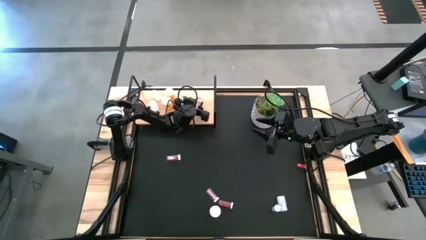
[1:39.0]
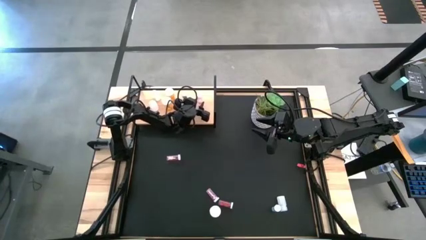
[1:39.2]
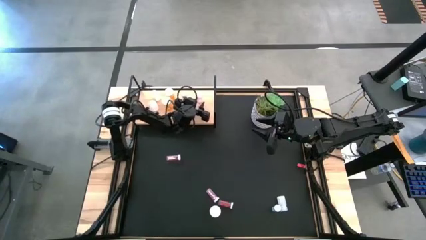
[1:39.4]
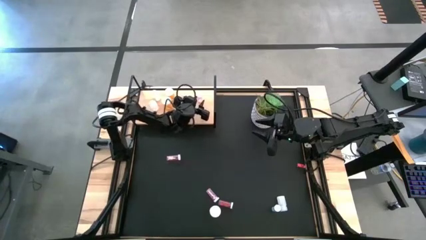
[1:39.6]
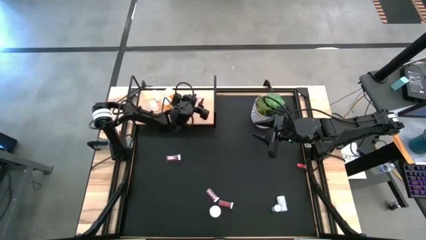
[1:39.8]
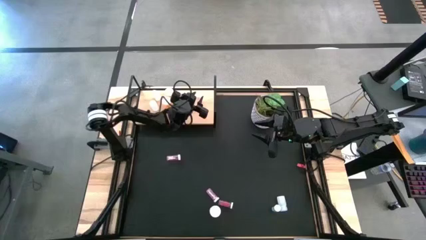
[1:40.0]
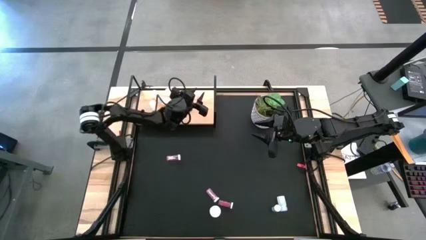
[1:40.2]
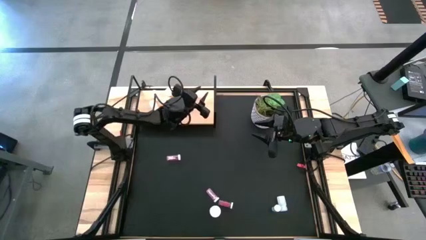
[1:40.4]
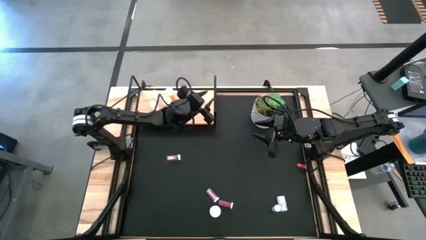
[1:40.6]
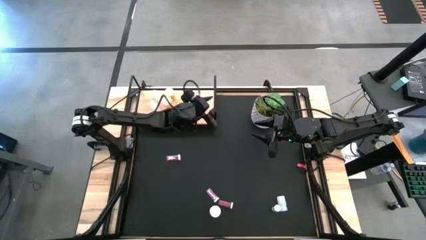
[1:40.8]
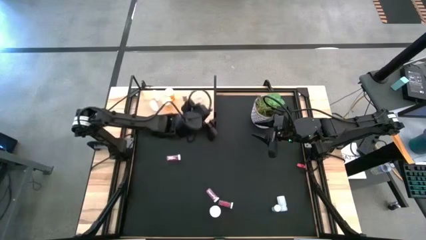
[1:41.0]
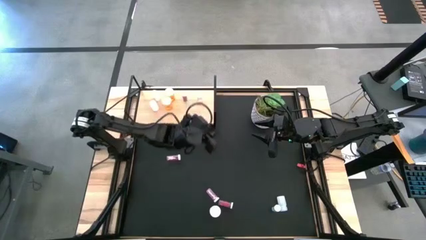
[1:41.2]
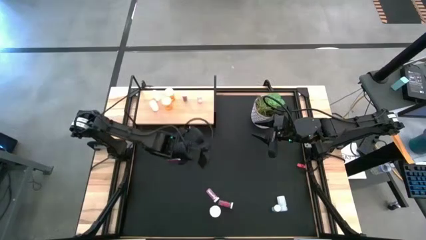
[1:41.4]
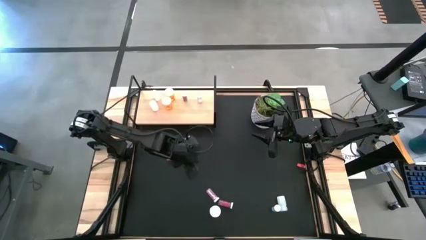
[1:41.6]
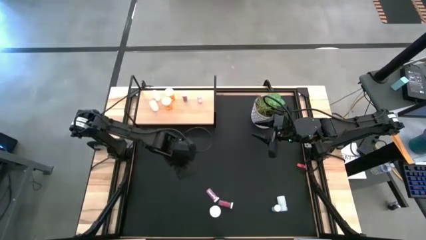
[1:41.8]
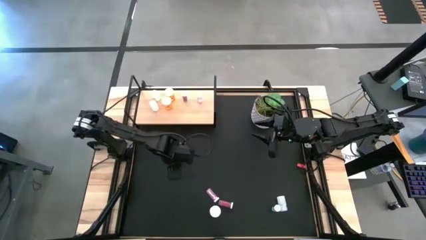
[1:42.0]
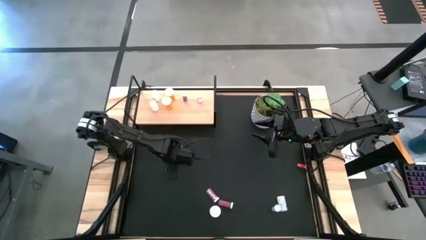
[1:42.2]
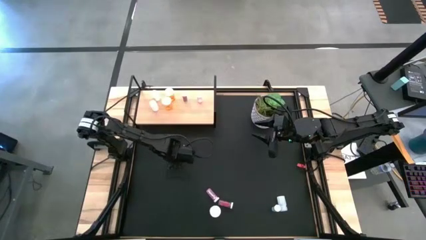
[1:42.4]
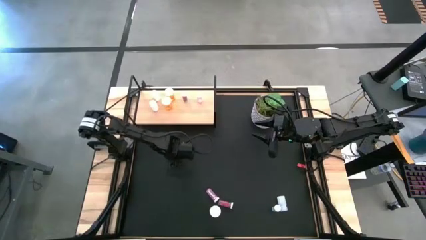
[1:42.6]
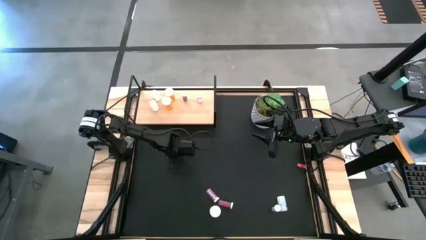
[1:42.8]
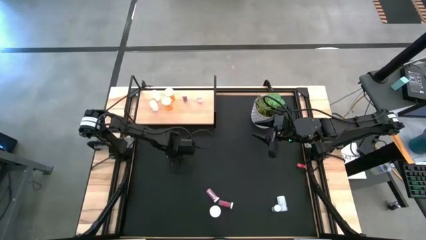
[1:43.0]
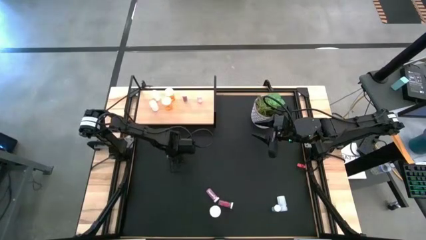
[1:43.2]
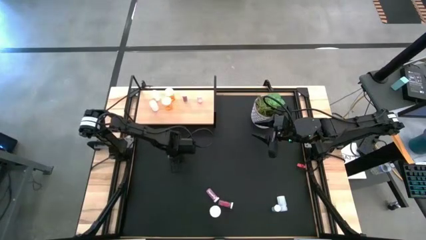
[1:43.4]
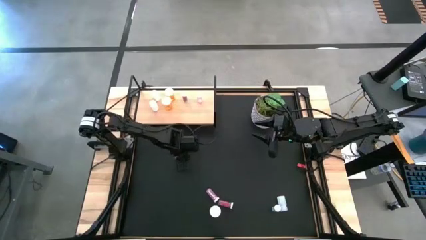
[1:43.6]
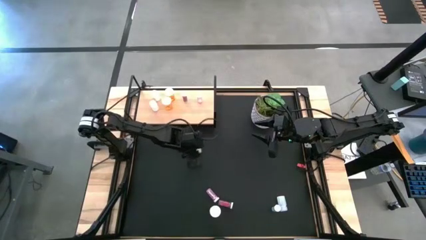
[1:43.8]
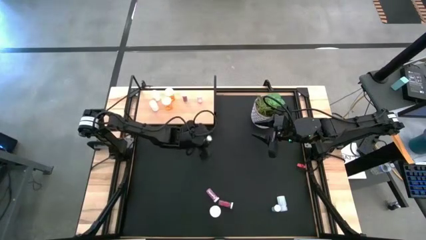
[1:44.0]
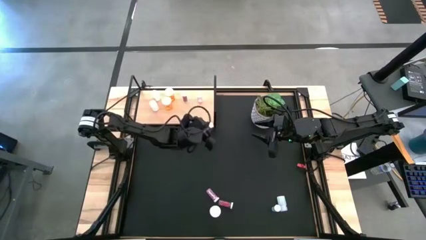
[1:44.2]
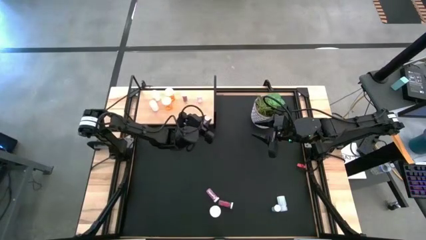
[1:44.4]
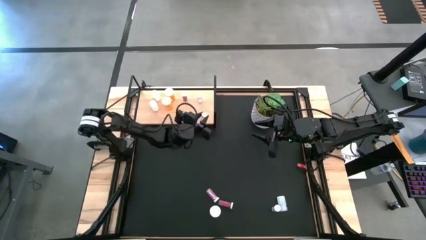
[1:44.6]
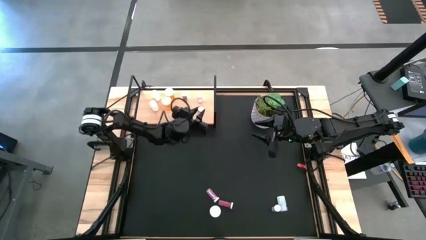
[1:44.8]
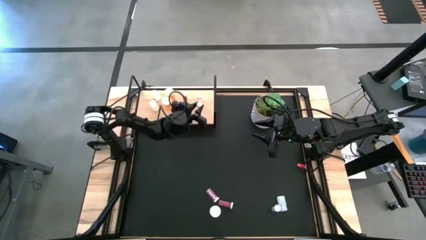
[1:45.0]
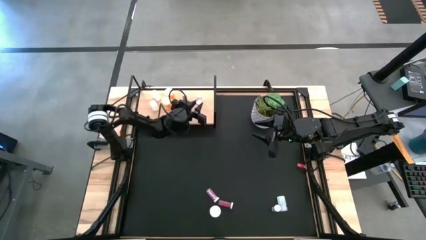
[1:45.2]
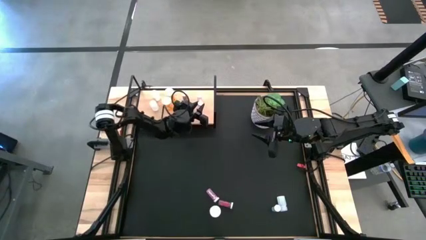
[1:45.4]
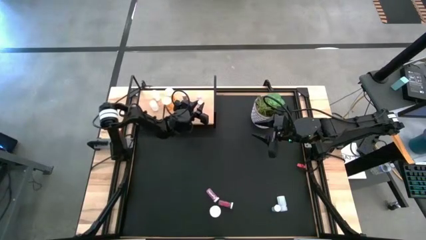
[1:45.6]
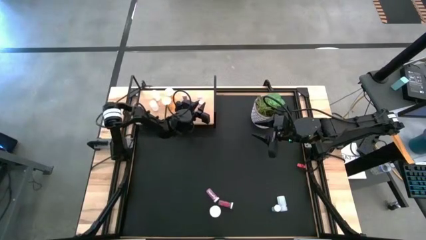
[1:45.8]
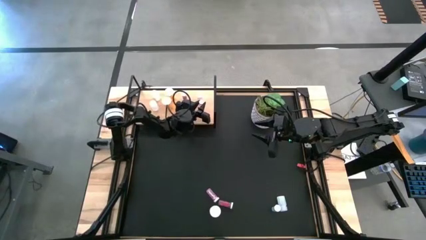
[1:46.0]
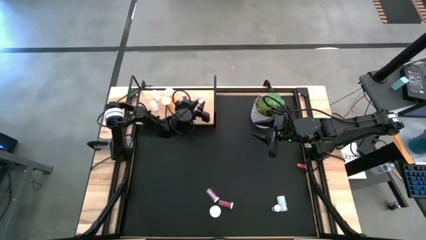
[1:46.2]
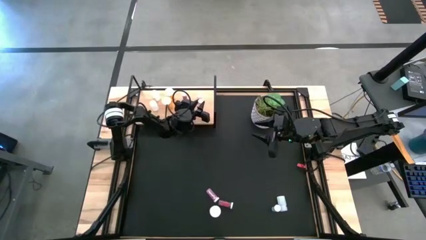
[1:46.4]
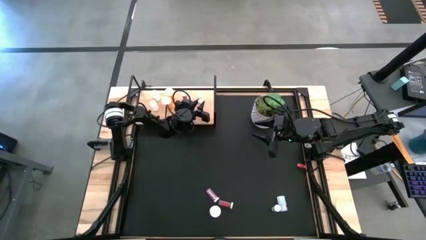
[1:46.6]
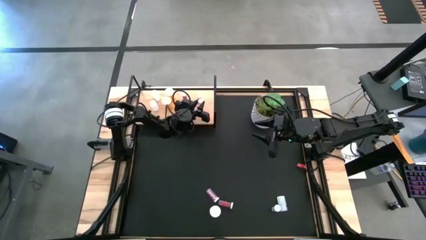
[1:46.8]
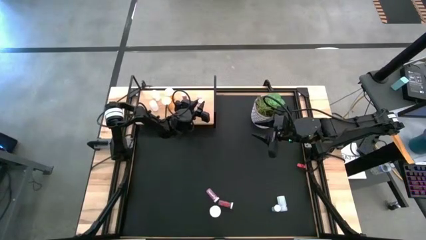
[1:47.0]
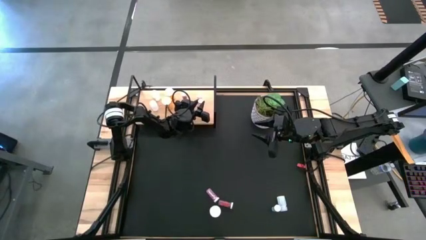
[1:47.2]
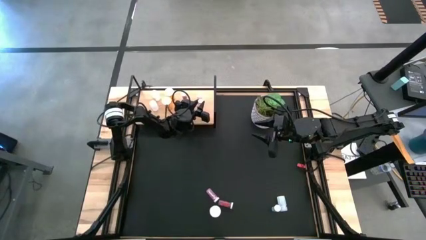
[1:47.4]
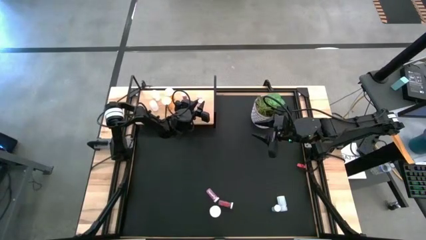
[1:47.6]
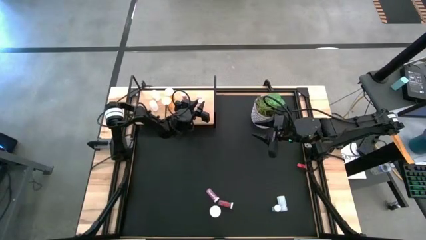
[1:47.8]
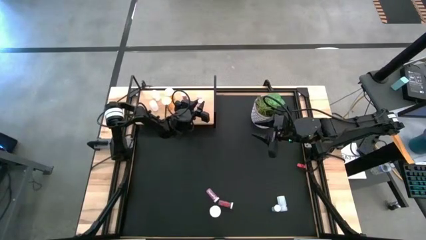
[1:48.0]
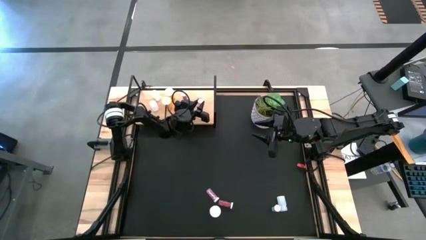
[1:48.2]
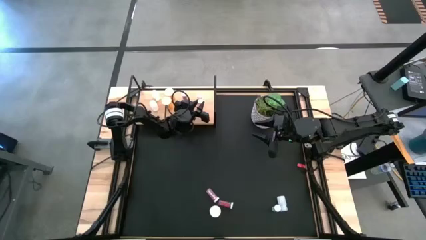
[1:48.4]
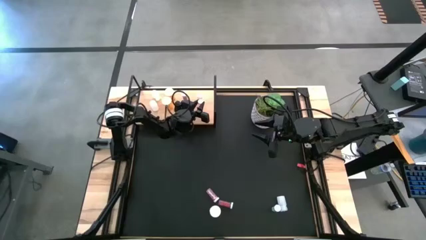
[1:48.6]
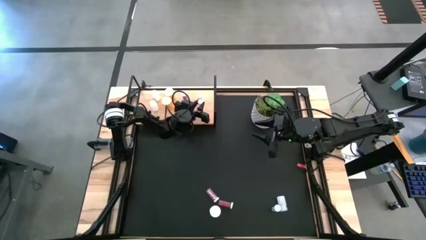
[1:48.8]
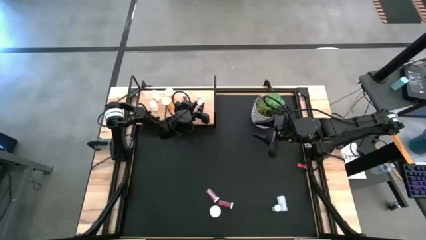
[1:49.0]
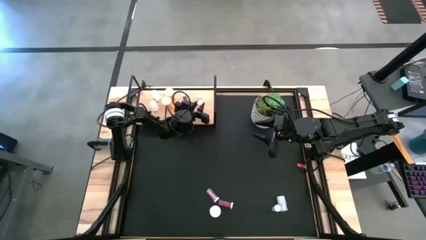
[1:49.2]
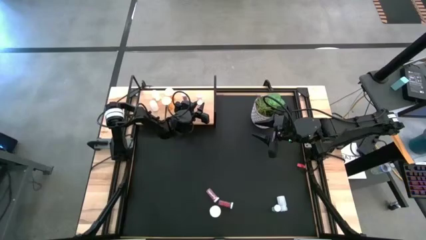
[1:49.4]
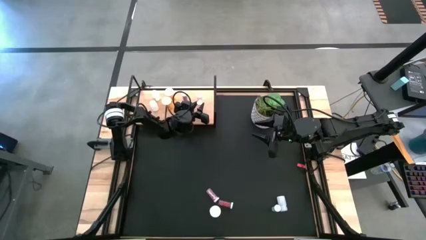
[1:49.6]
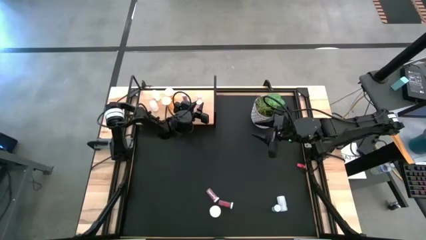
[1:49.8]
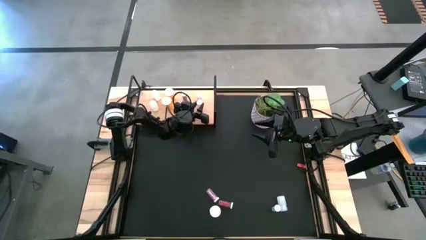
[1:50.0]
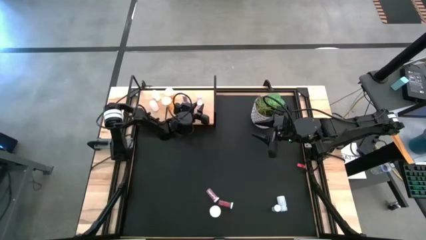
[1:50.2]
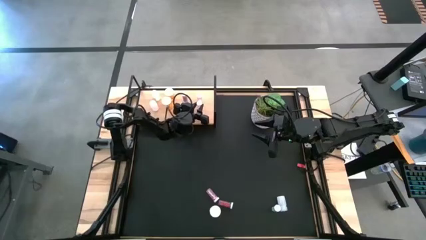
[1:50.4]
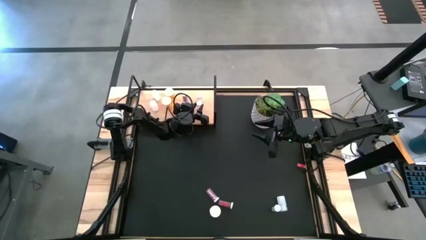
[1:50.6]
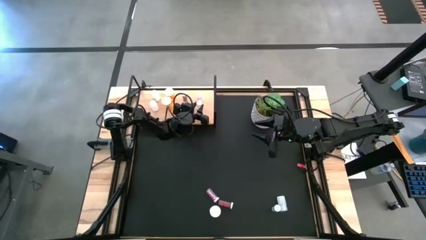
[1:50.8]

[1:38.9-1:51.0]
Task: Pick and place medicine bottles onto shelf by color
Put the top pink pill bottle on the shelf aligned with the other pink pill bottle

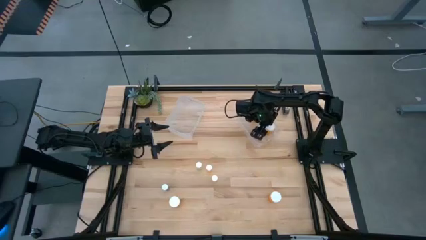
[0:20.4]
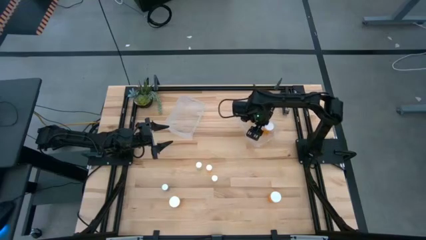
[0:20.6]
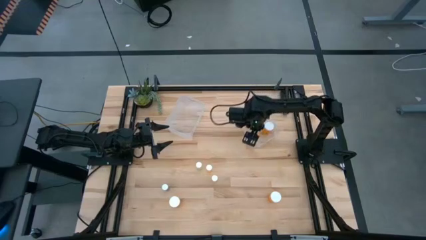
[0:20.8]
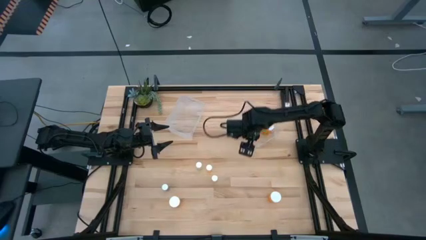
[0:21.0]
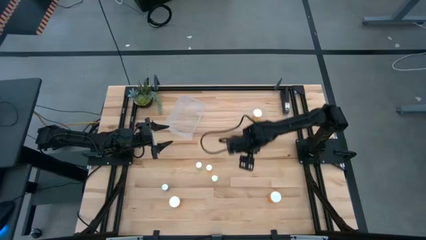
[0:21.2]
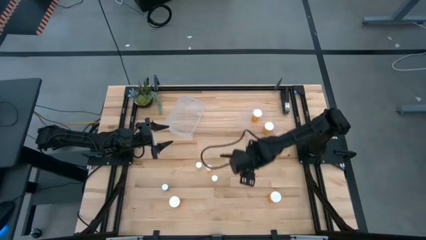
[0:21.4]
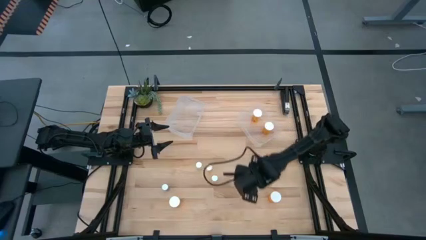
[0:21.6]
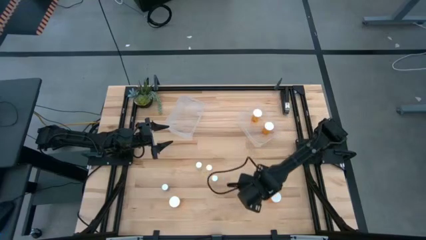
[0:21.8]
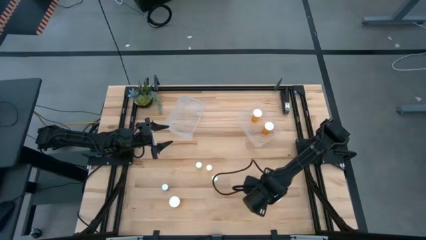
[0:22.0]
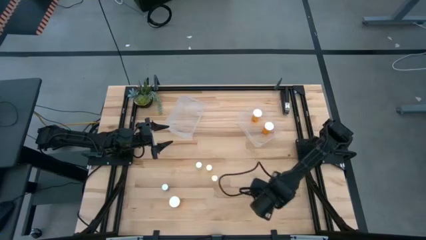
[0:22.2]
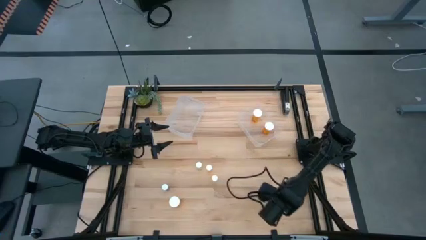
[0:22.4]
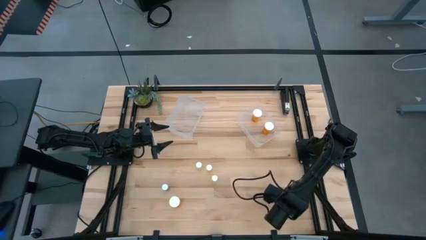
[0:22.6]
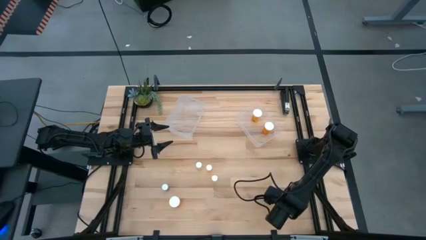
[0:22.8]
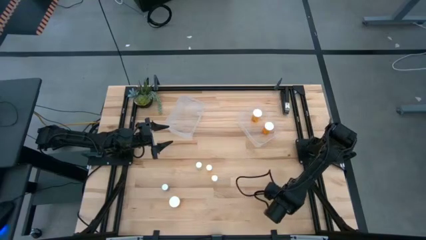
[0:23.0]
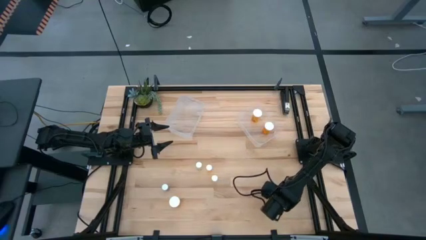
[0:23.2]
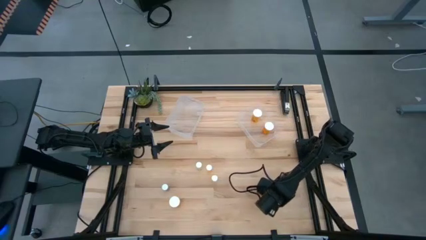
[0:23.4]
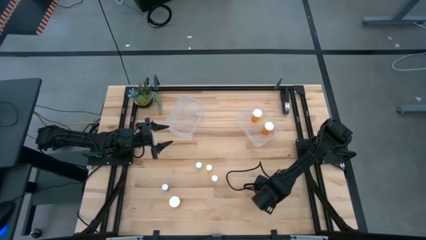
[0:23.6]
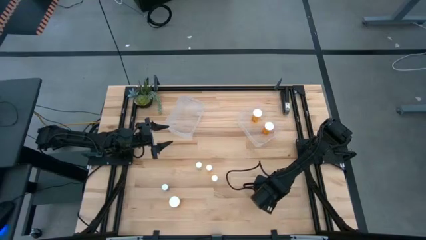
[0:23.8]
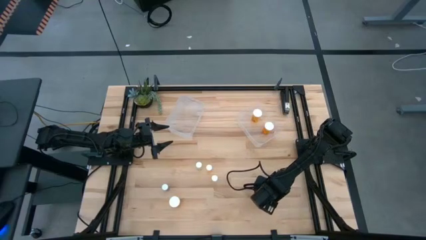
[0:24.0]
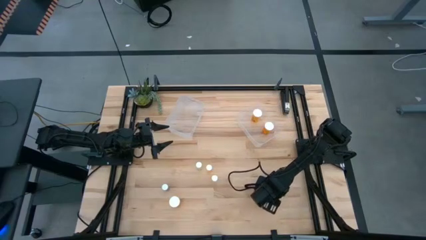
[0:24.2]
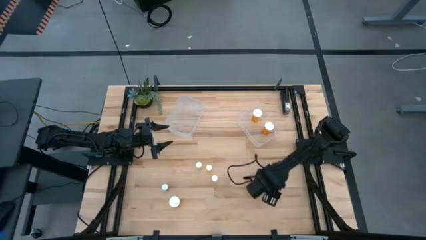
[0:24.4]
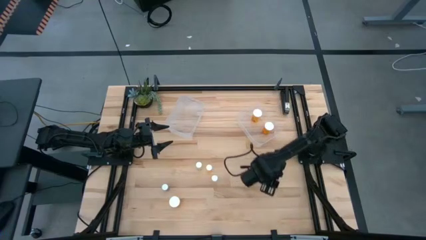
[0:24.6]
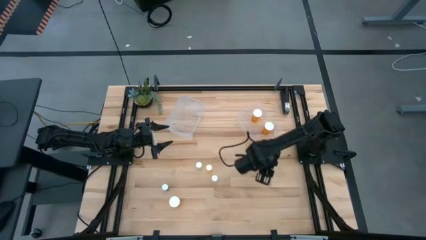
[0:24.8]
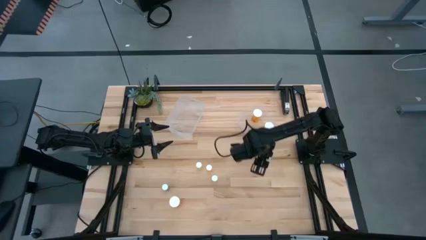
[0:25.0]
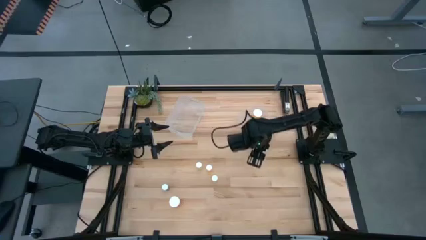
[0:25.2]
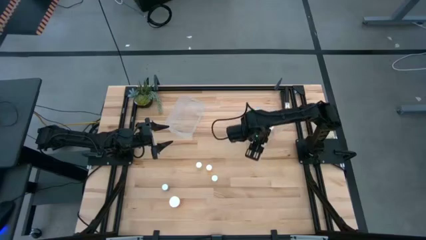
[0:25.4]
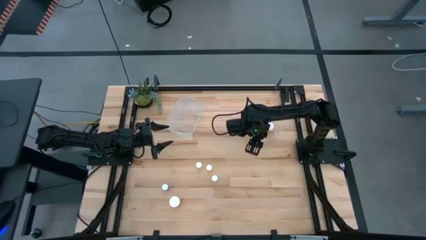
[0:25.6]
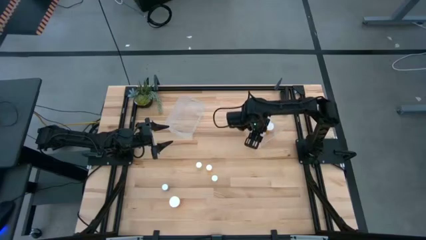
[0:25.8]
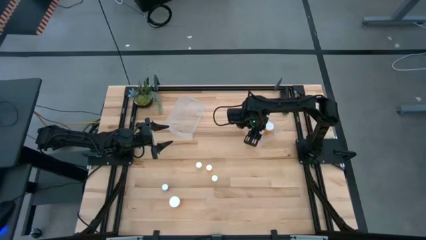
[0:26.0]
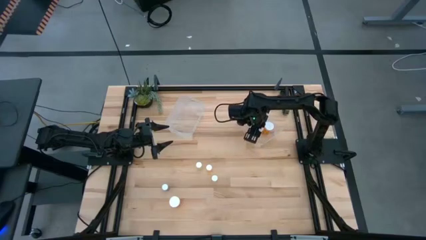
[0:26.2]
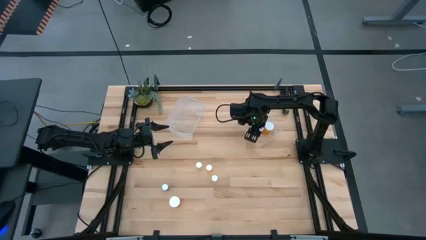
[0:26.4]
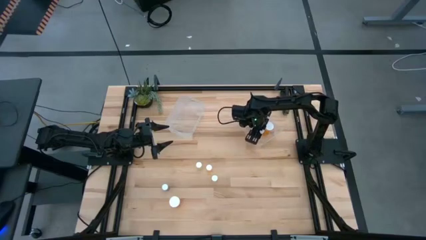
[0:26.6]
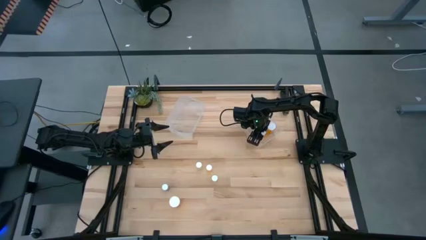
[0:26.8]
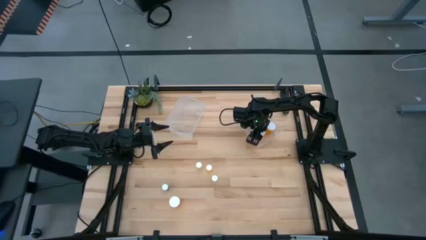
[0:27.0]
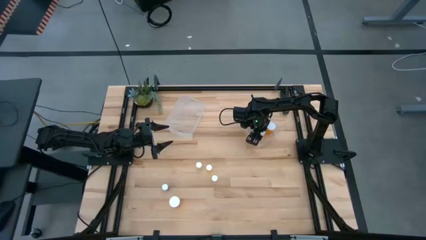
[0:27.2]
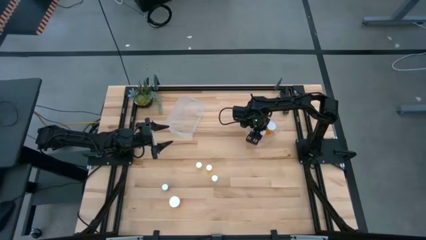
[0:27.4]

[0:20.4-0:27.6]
Task: Pick and place medicine bottles into bin by pill shape (circle, oval)
Put the big orange pill bottle into the right transparent bin
